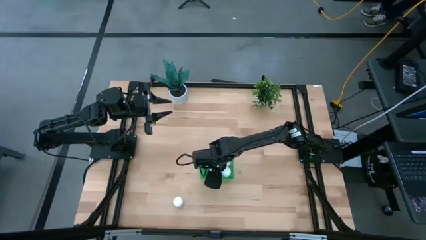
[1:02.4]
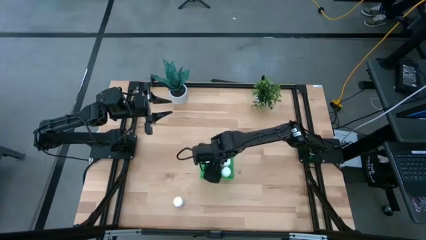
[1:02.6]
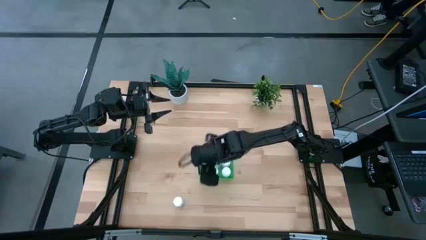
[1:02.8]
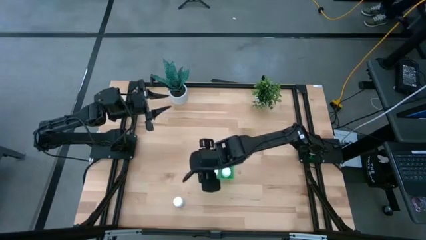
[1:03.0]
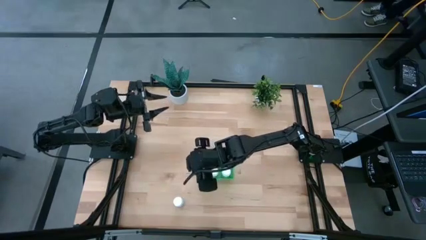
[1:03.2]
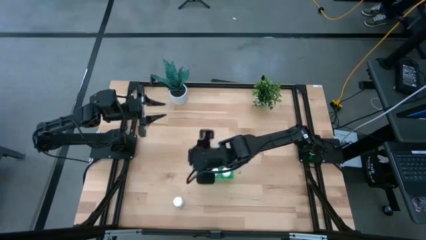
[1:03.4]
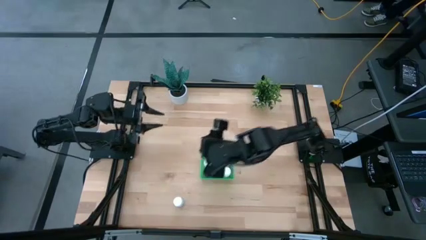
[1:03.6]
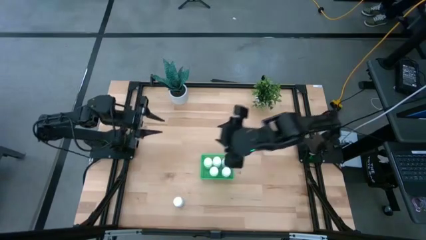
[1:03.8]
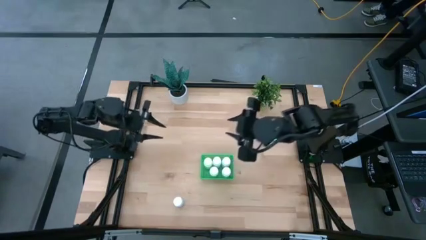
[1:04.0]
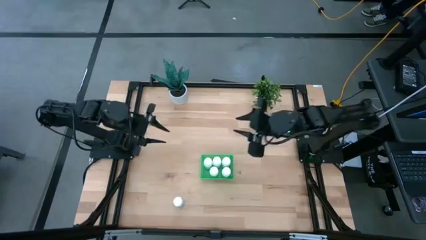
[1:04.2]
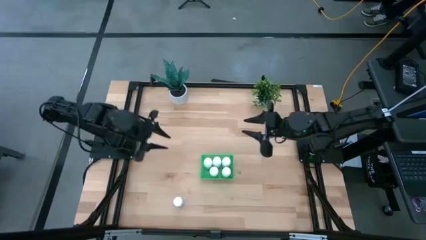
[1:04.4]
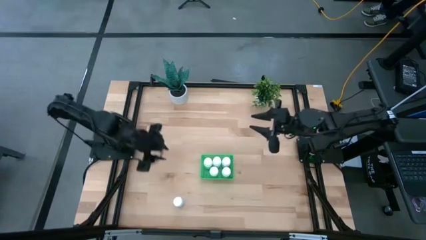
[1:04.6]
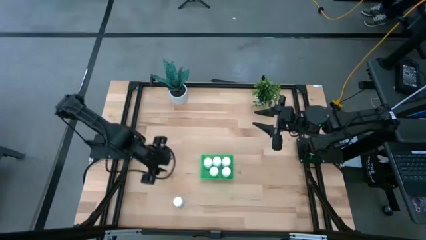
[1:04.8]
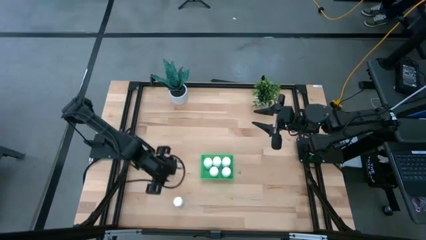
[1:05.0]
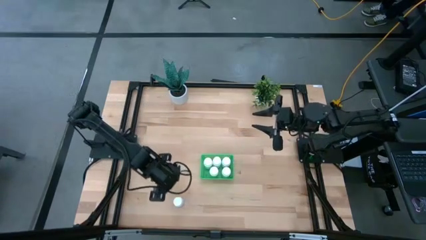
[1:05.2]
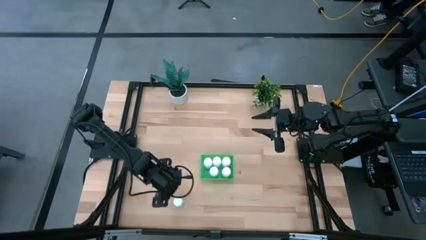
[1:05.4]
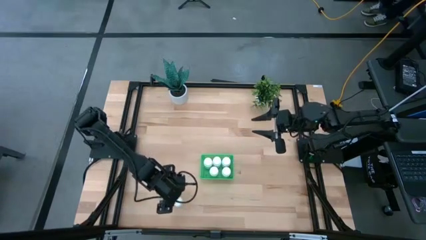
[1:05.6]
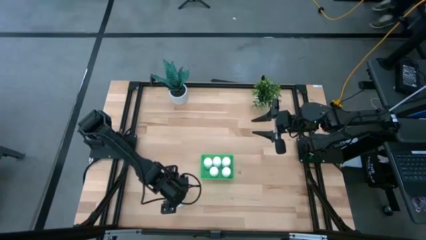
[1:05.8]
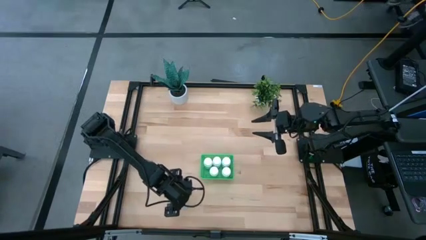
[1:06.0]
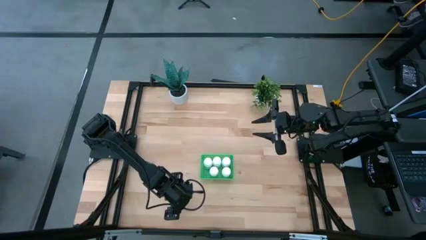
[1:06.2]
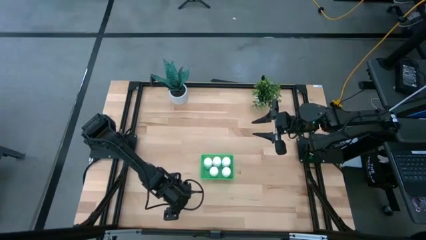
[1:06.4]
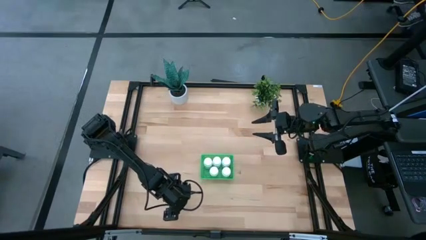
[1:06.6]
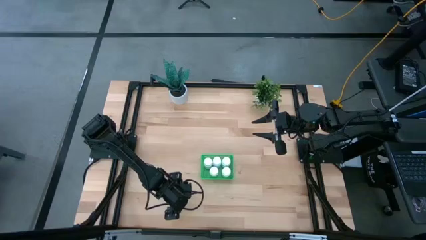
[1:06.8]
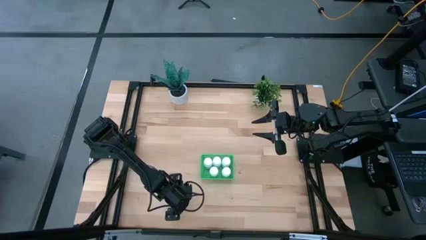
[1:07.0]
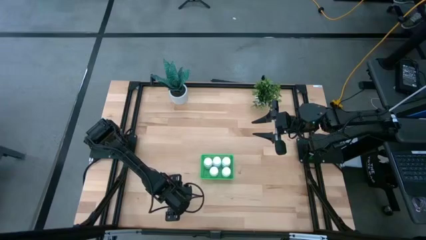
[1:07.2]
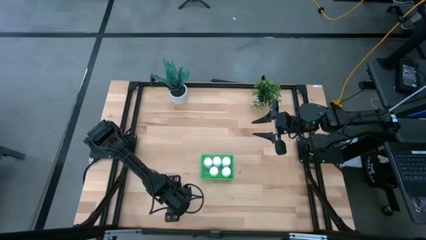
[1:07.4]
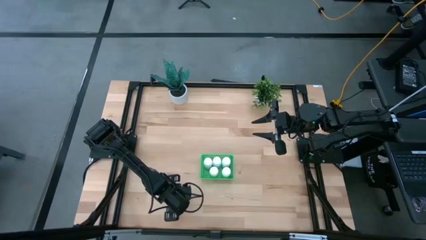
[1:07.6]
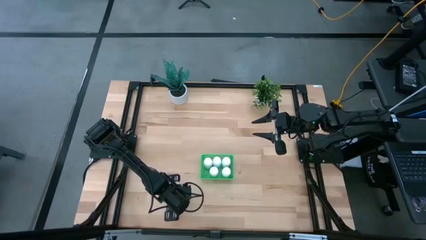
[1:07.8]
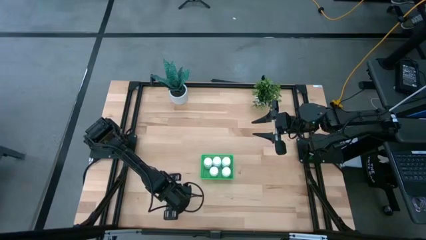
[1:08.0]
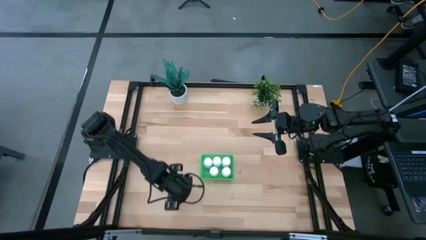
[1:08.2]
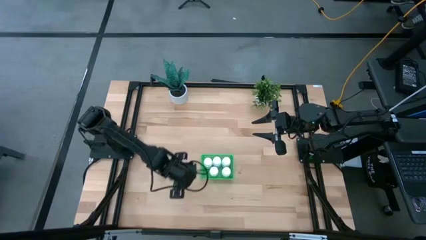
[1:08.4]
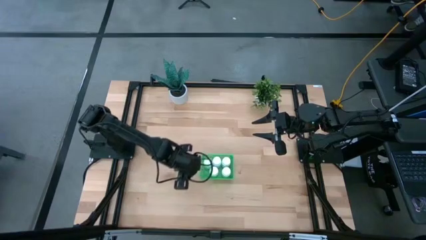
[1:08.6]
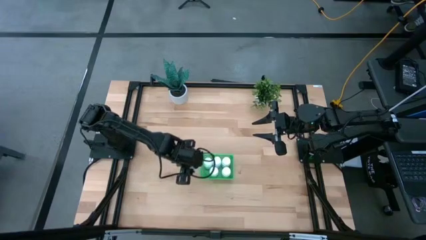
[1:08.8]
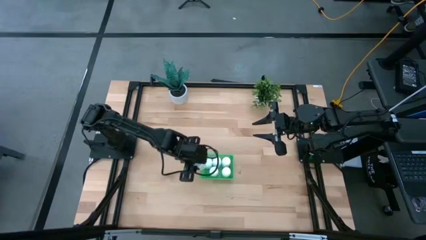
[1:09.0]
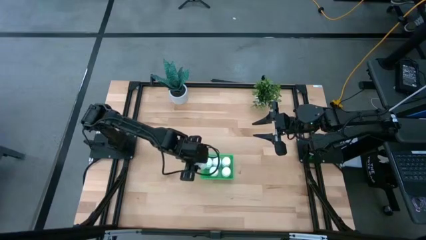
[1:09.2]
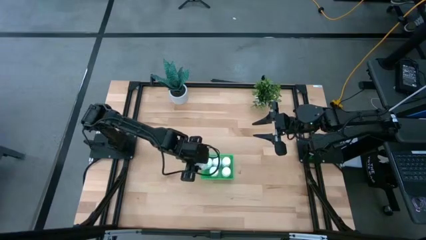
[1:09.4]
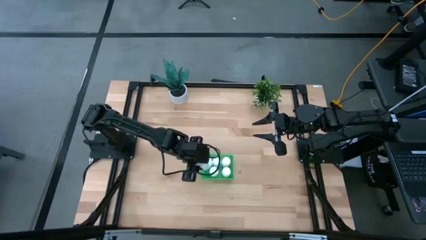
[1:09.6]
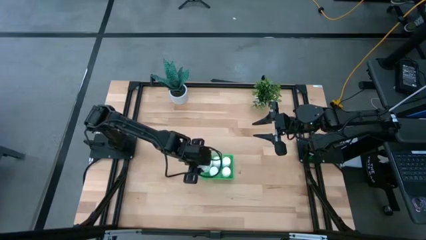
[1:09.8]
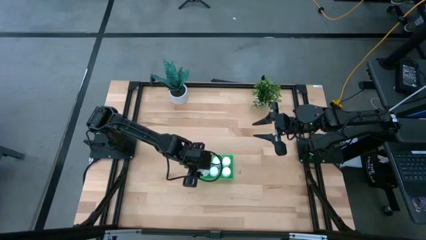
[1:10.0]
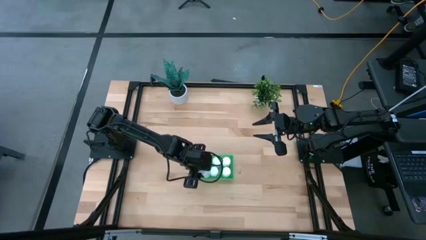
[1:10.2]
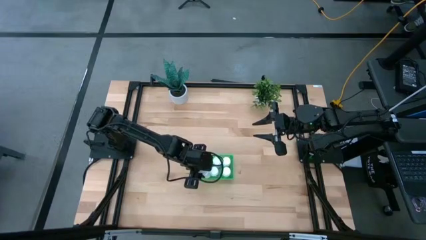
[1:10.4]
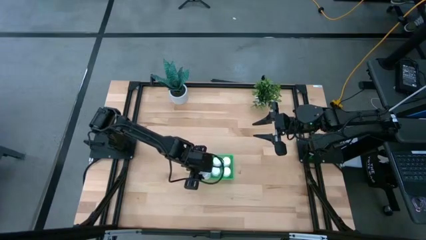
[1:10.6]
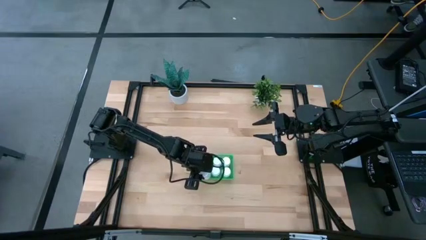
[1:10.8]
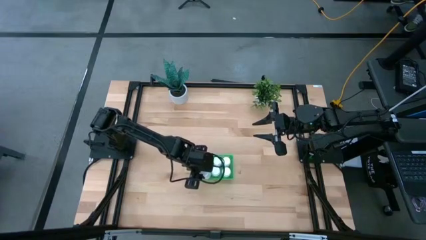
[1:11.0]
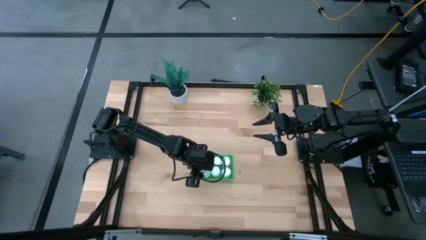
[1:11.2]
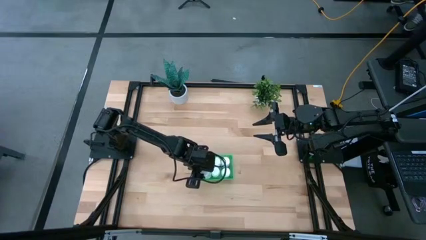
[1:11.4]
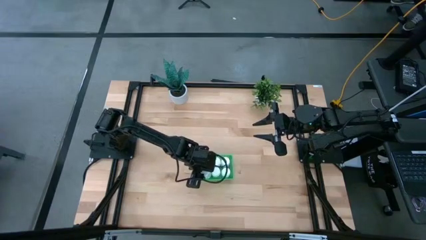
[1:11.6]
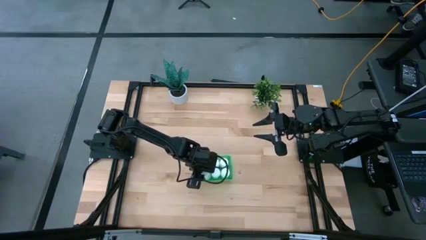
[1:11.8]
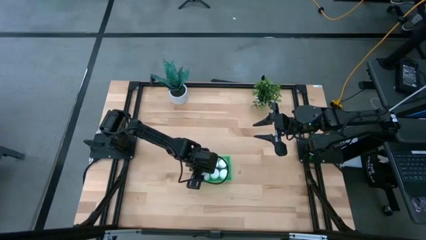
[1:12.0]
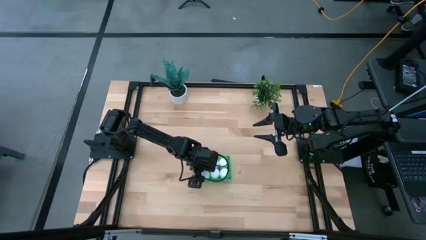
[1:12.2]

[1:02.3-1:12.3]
Task: Pick and place pill bottles into a basket
Put the white medicine bottle into the green basket

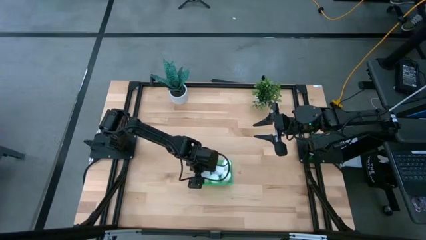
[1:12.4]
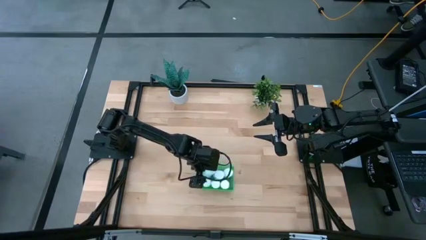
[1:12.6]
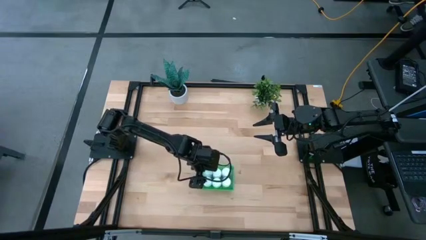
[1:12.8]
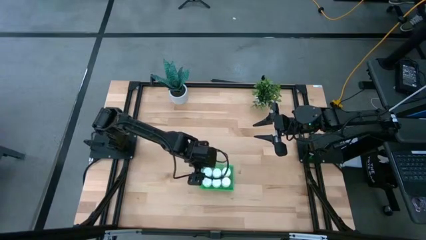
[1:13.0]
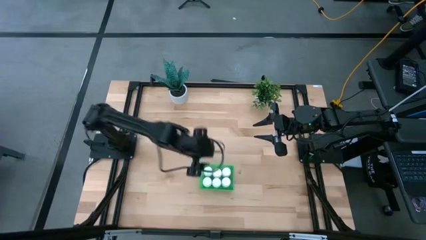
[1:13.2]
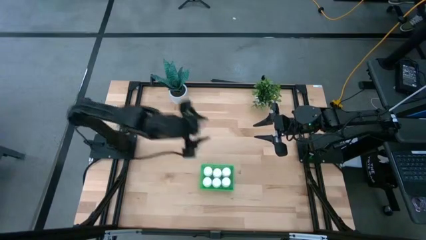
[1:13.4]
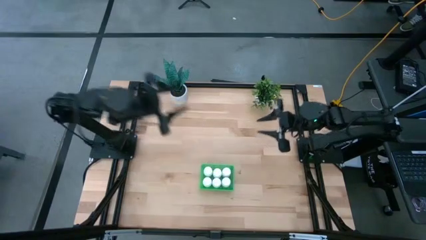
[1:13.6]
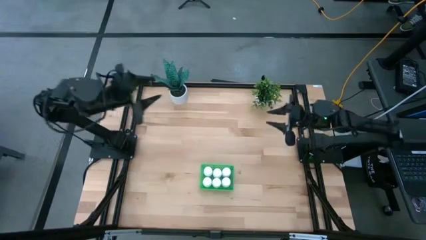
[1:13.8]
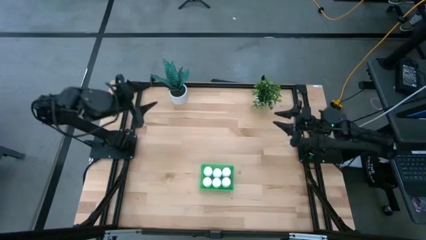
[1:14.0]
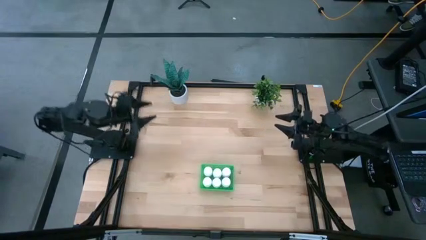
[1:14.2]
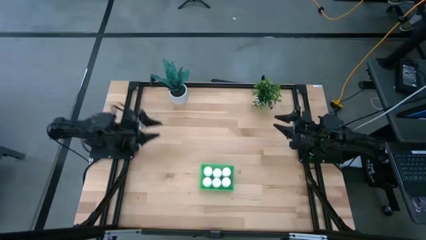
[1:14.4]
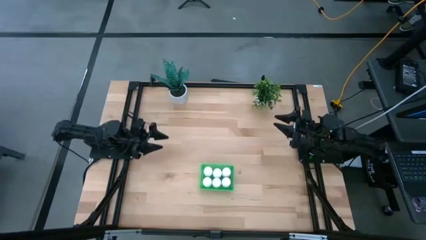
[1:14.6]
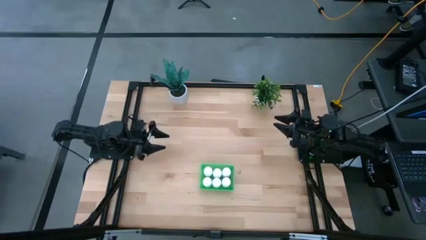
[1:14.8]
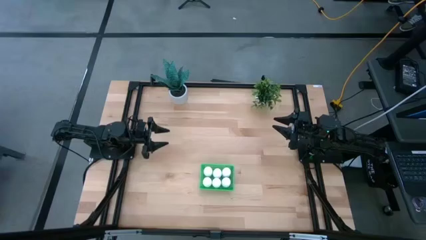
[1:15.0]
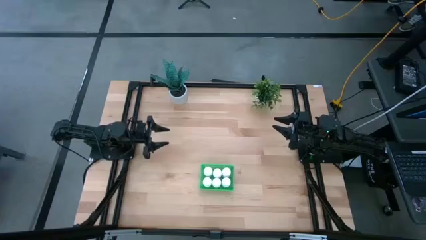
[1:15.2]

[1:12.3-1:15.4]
Return to Home Position

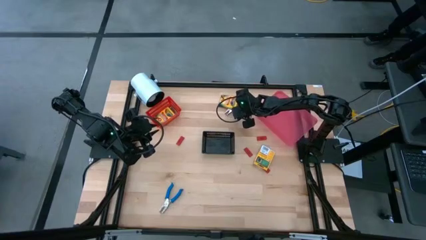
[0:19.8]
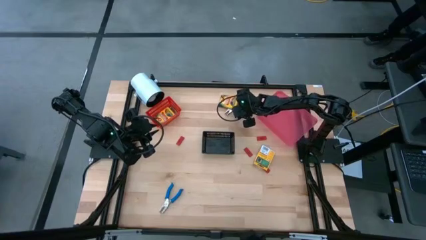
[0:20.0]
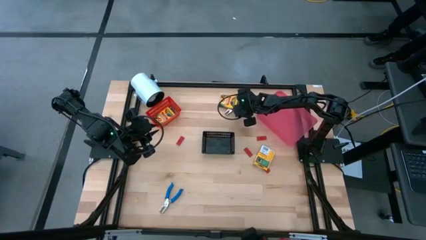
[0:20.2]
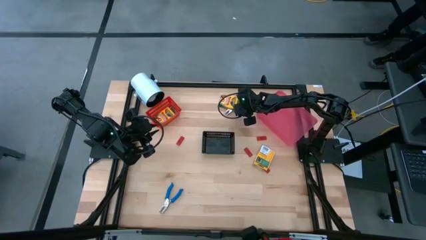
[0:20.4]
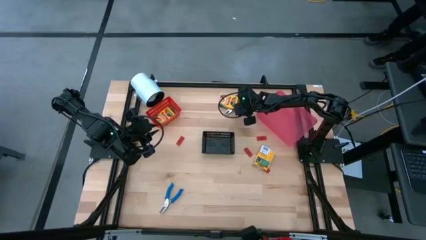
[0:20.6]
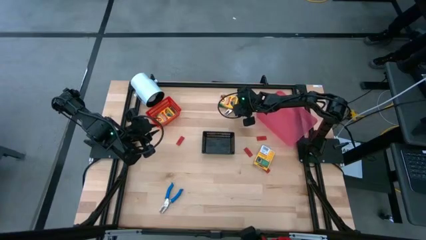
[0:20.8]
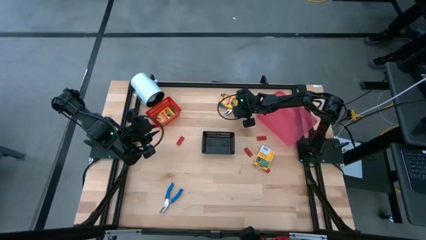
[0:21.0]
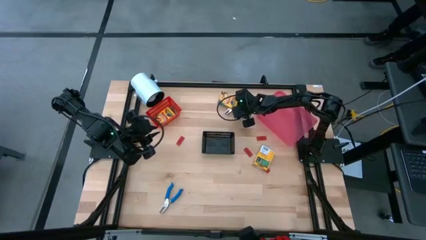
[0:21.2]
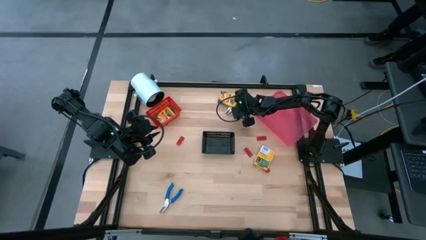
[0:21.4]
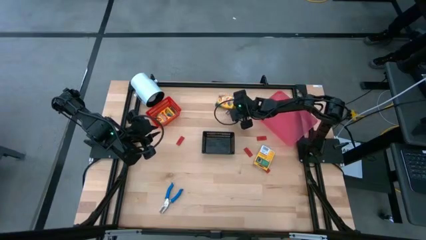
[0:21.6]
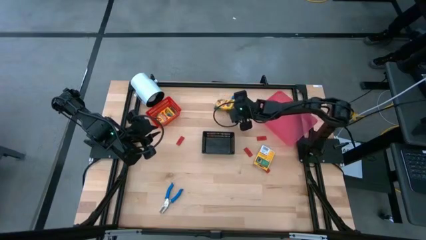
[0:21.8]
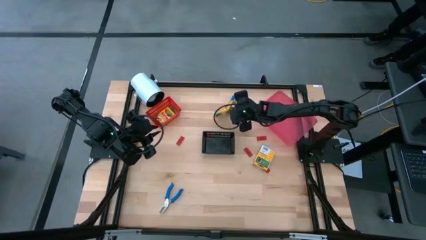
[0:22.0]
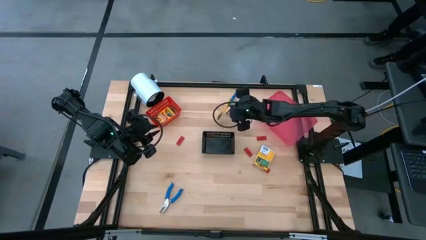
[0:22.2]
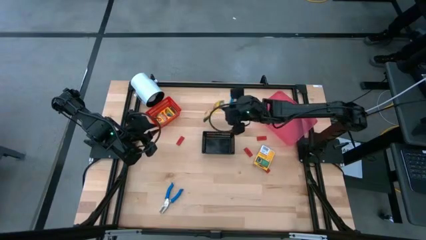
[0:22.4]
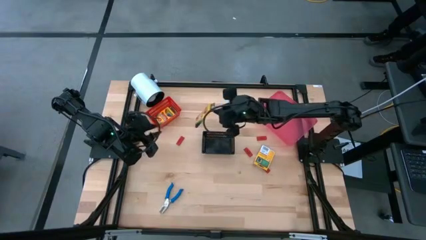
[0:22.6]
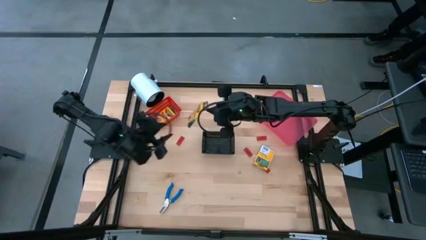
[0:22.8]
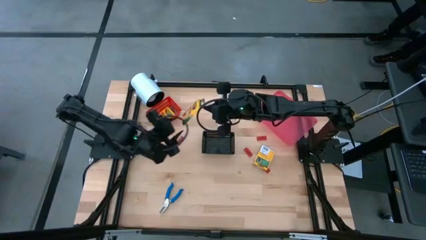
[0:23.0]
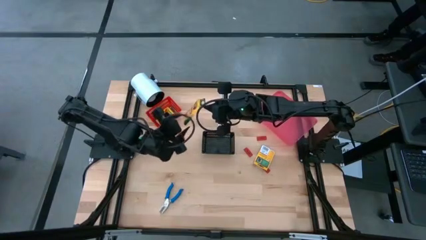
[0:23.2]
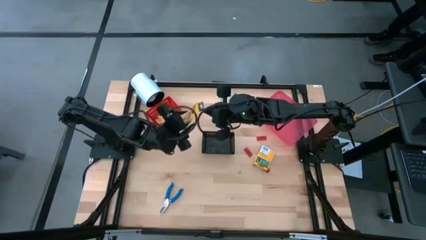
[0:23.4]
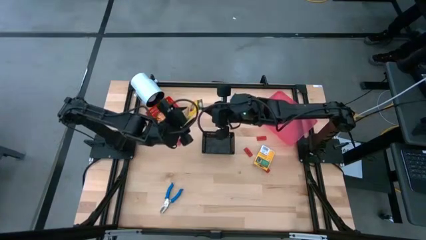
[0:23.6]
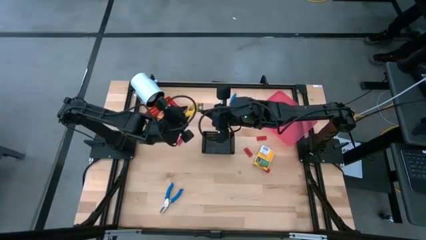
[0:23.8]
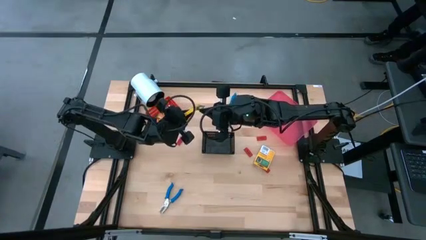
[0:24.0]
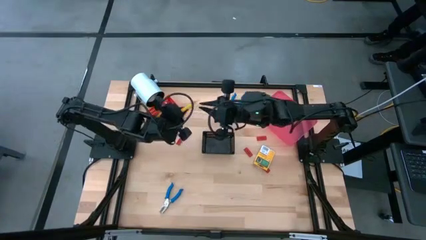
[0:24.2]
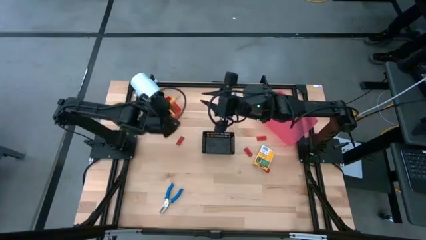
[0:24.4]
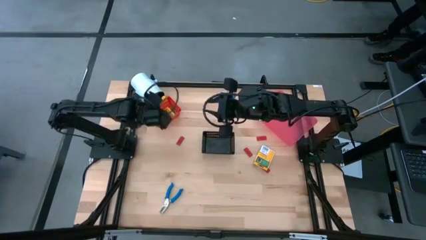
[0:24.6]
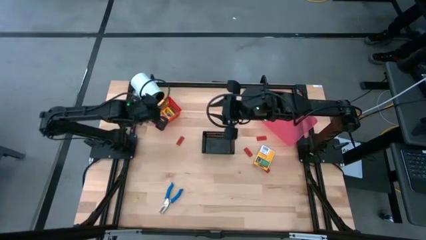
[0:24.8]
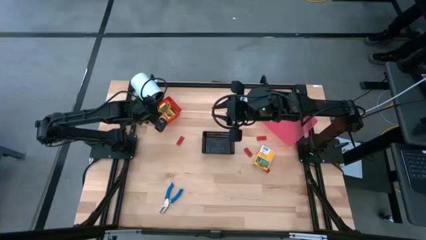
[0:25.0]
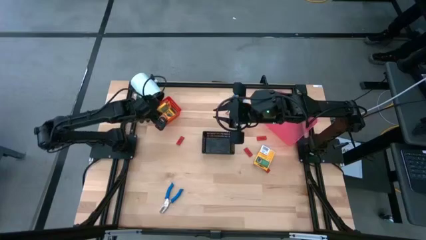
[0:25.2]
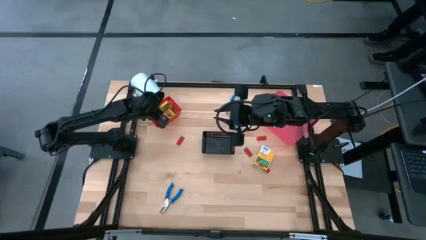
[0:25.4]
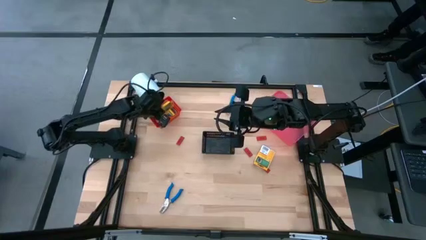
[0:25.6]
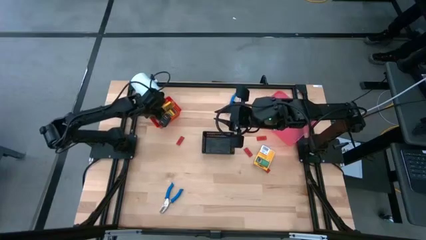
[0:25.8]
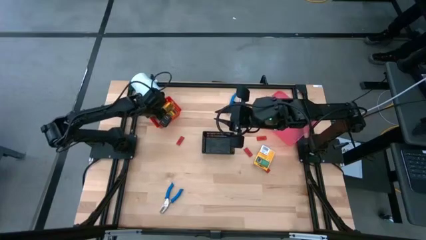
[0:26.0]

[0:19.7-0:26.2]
Task: Pick & Place School Supplies
Put the top crayon box into the red bin
